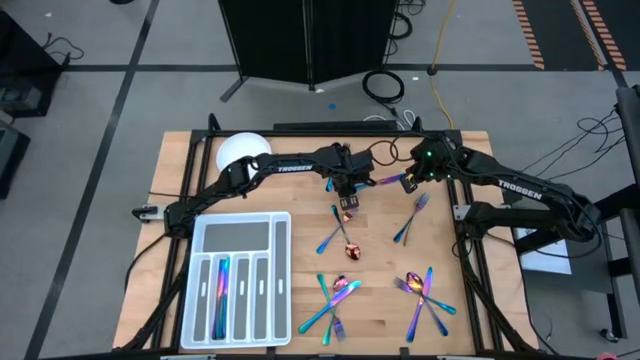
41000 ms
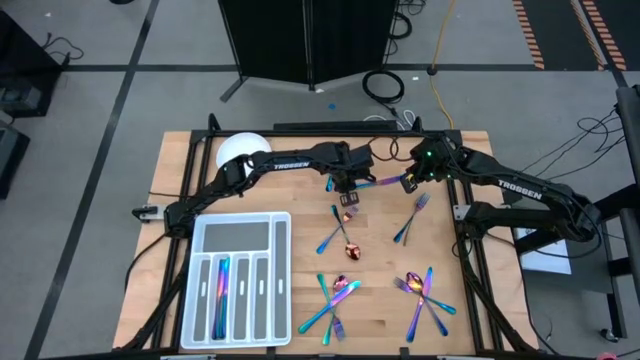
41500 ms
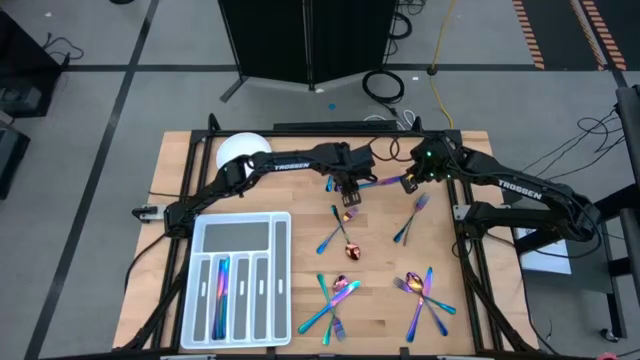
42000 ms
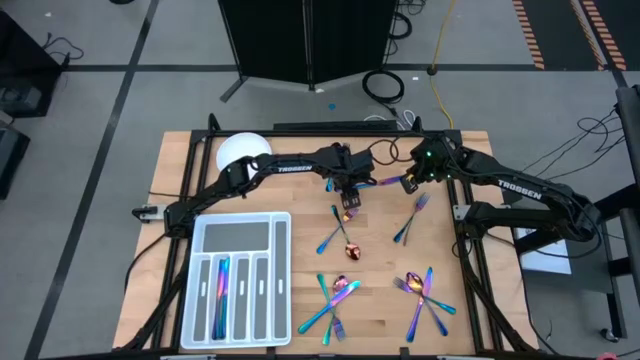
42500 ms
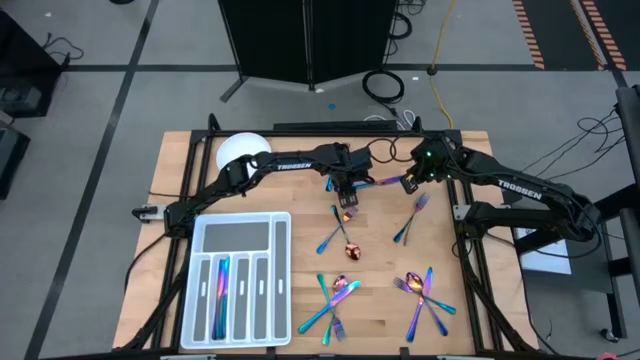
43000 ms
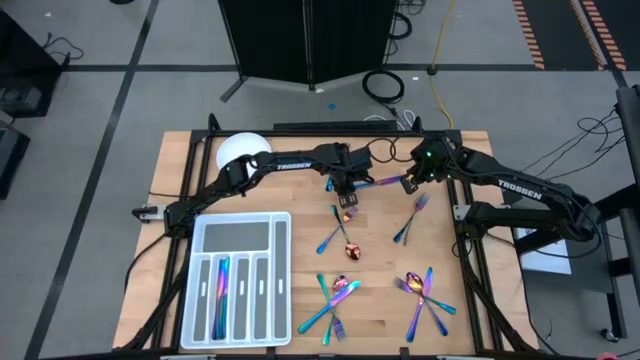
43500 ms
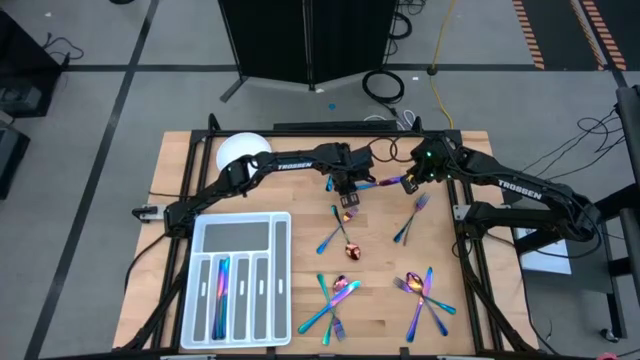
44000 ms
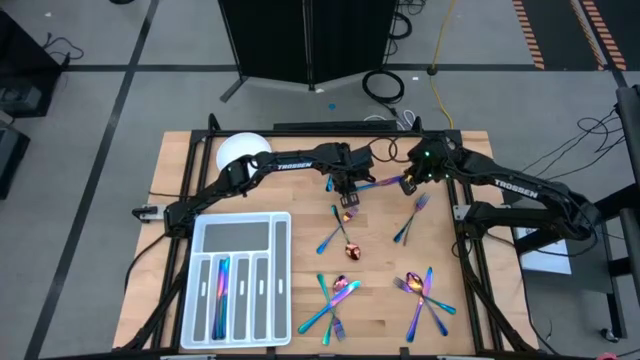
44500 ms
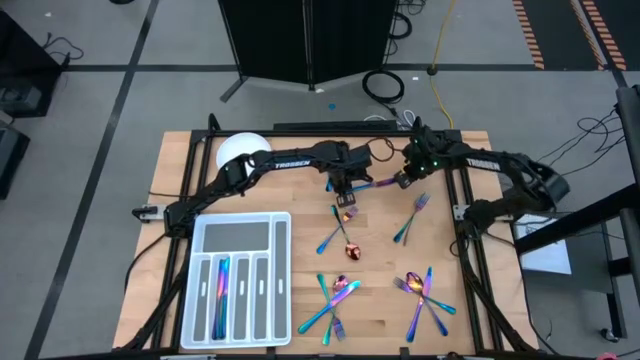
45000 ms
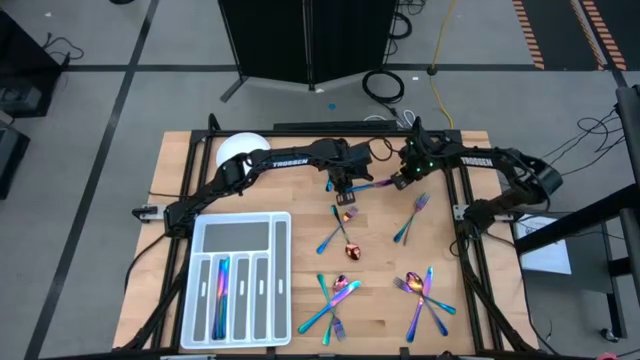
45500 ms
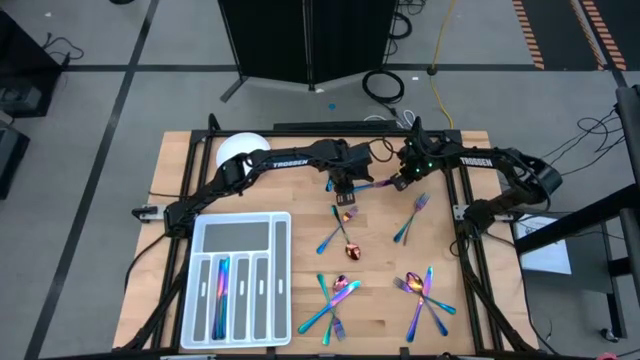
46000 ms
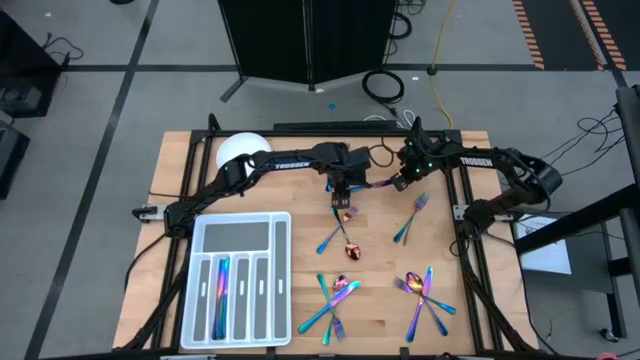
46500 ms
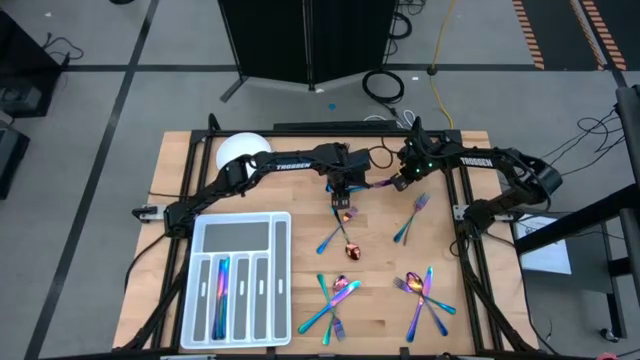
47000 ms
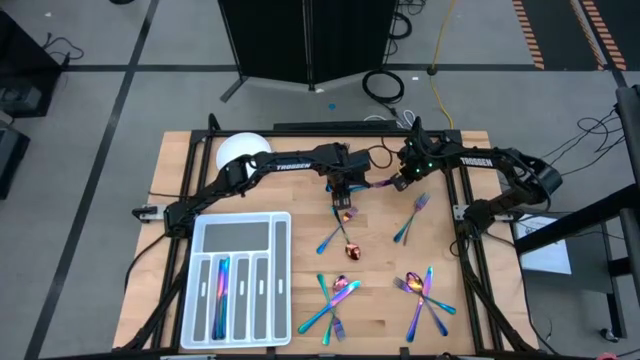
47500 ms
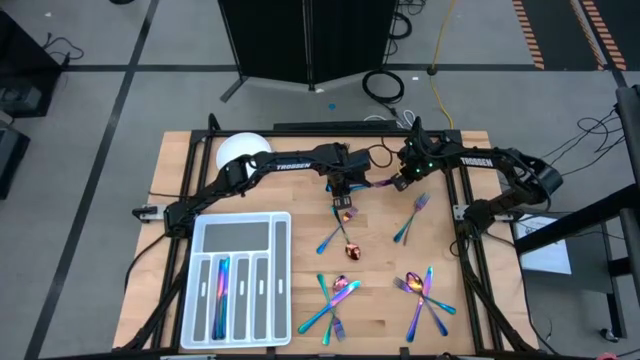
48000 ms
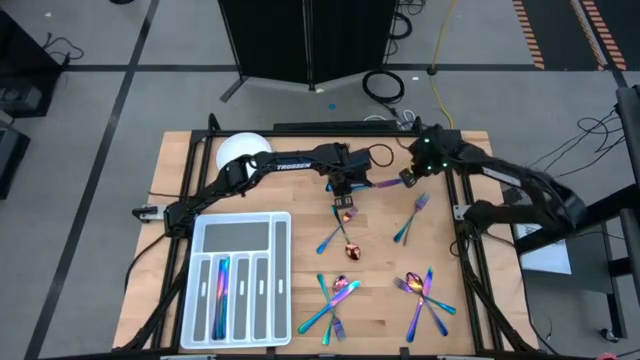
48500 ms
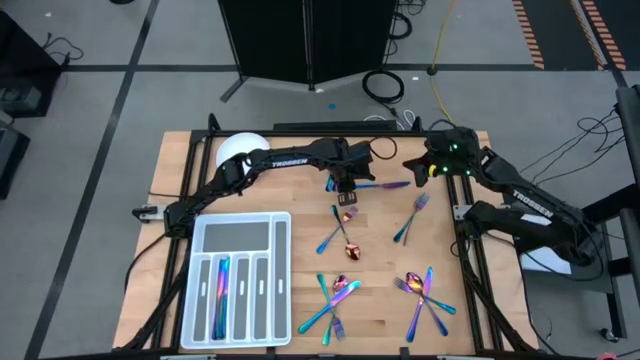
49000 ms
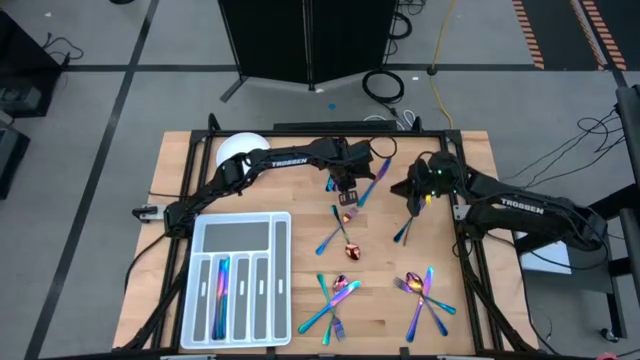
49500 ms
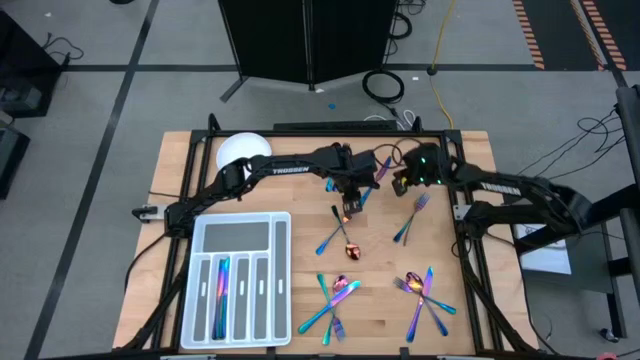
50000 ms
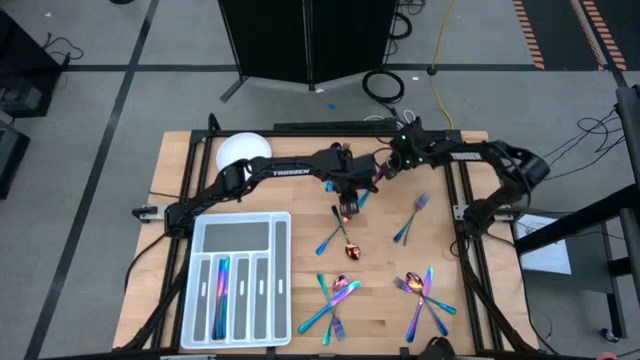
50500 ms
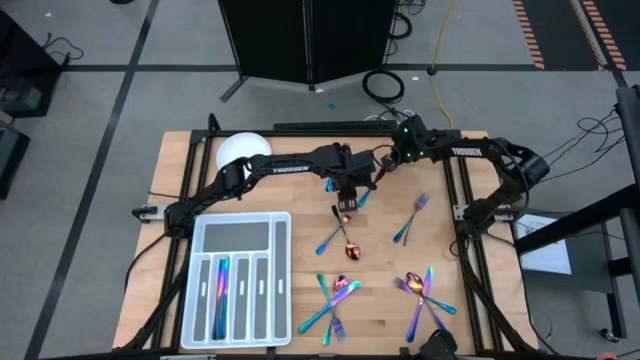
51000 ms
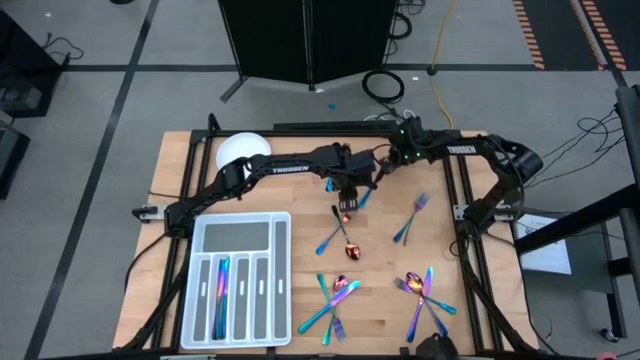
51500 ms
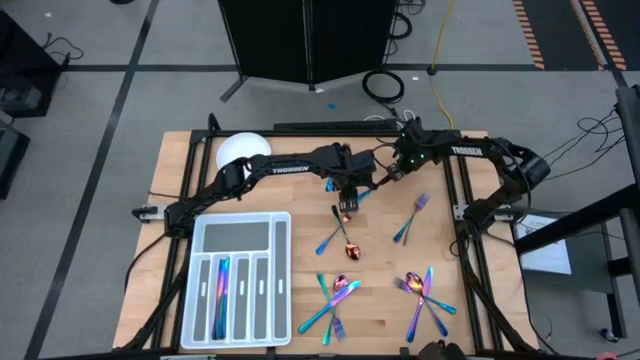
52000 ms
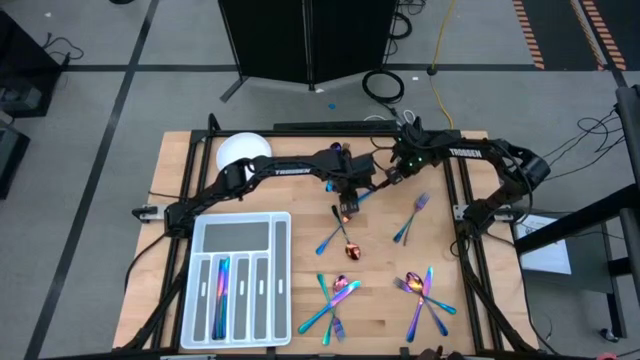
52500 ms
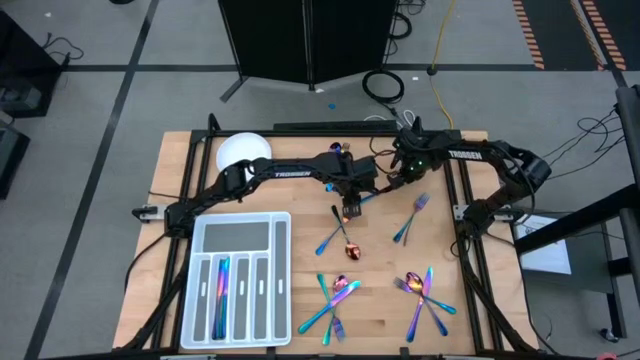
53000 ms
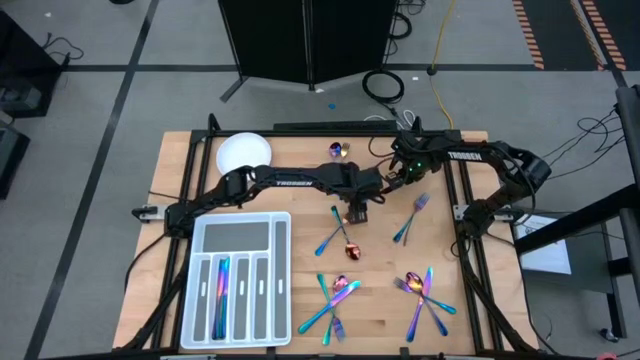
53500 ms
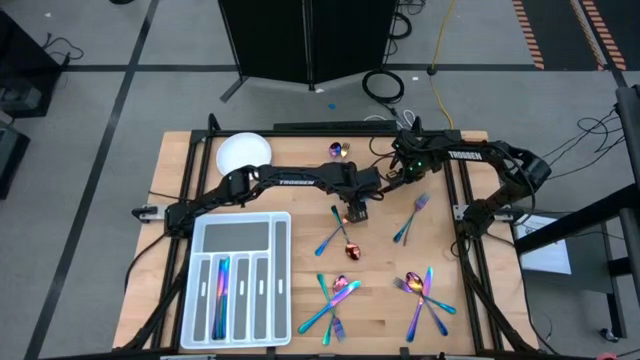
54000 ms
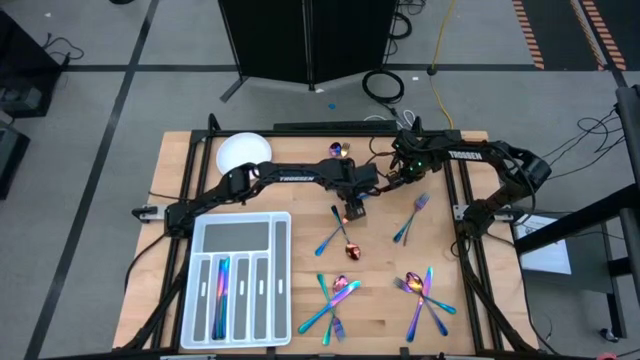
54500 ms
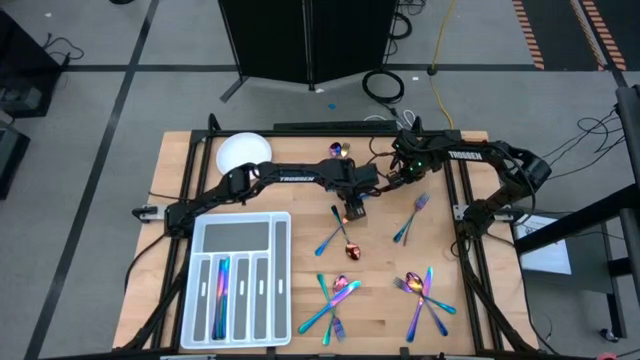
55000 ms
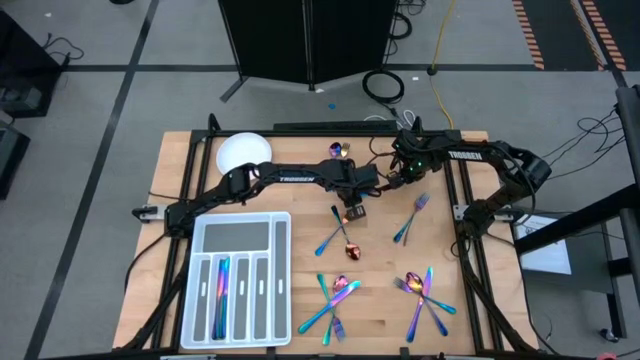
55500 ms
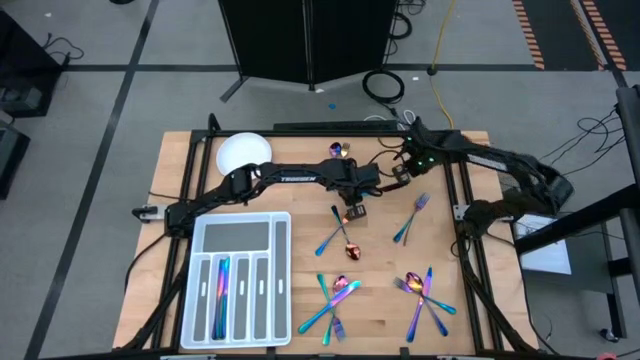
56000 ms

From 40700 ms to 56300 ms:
Task: Sort silverware
Put the iridescent blue knife in the silverware tray

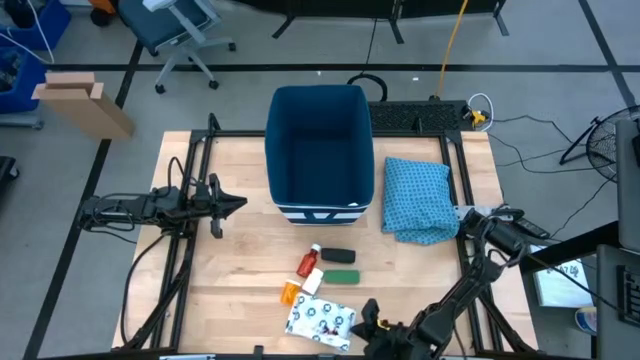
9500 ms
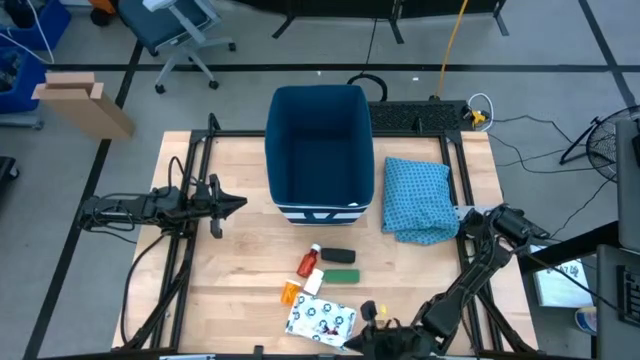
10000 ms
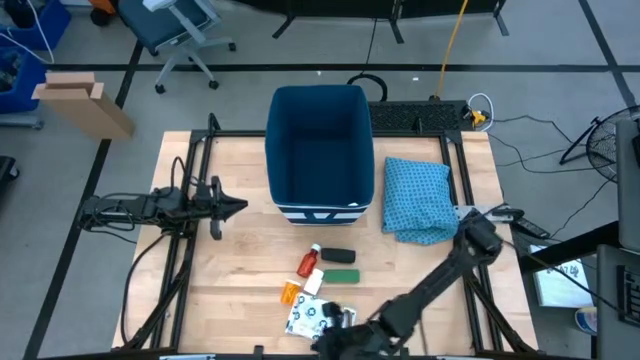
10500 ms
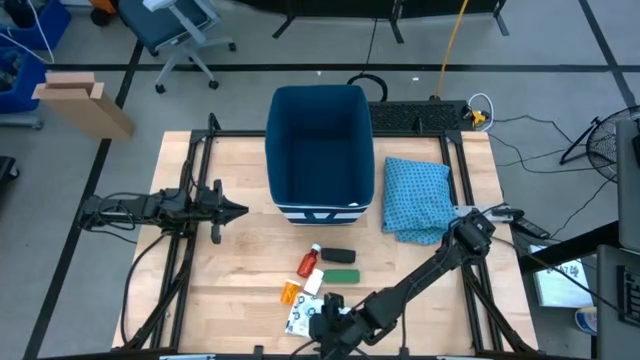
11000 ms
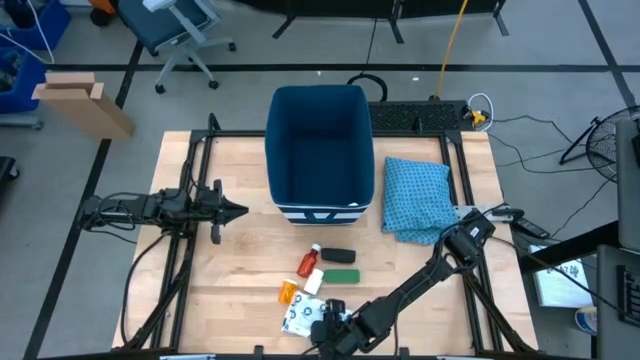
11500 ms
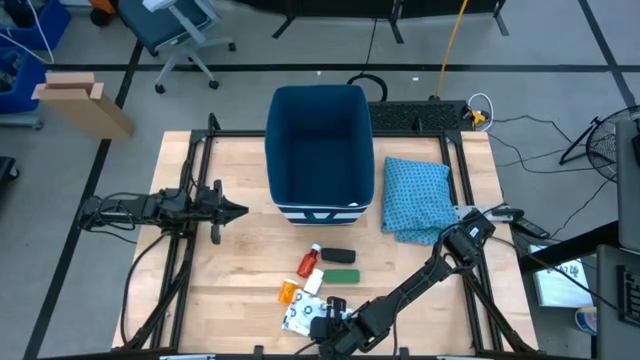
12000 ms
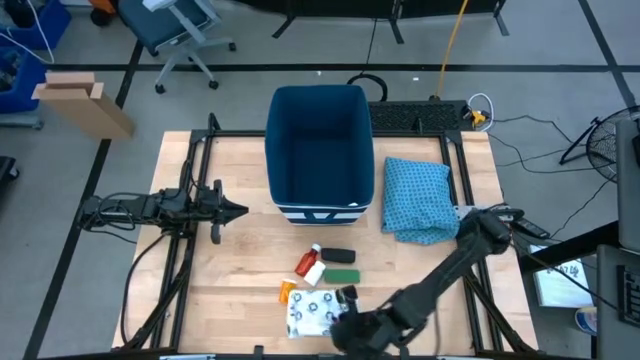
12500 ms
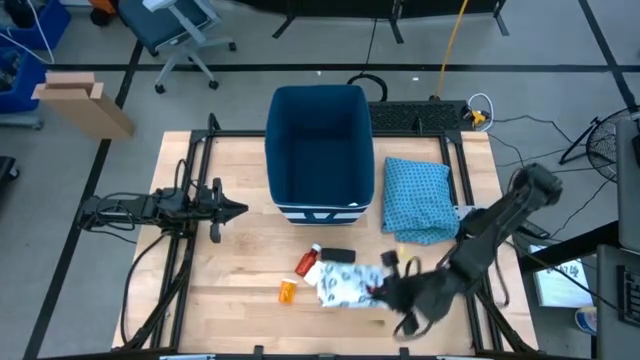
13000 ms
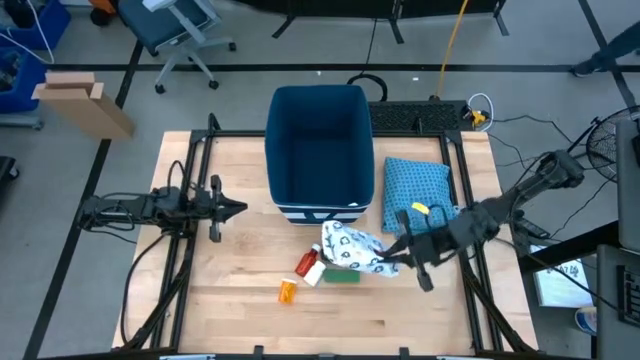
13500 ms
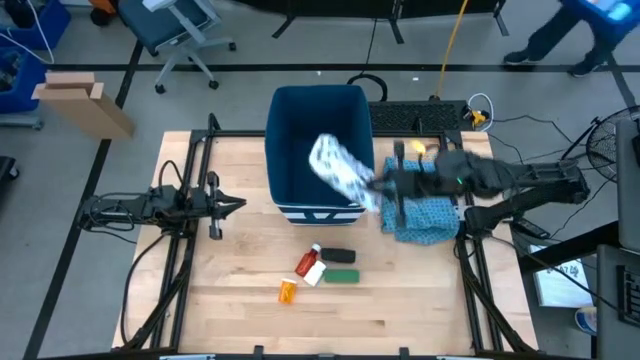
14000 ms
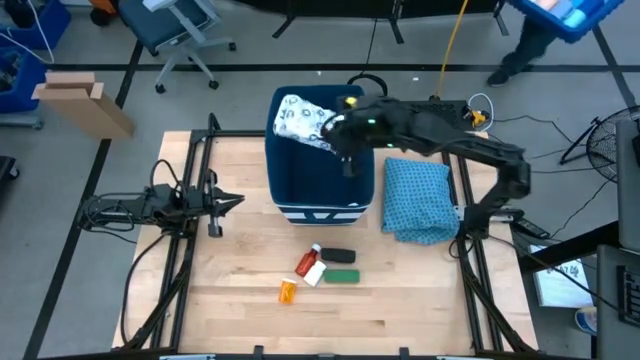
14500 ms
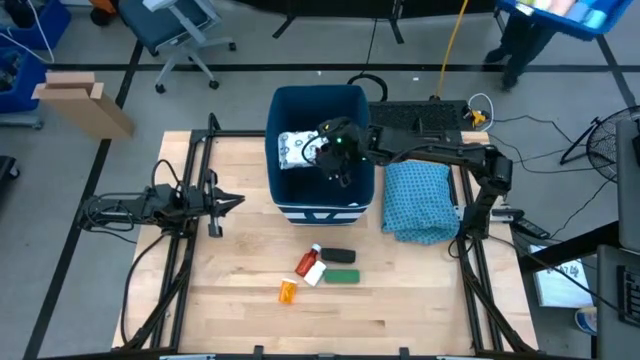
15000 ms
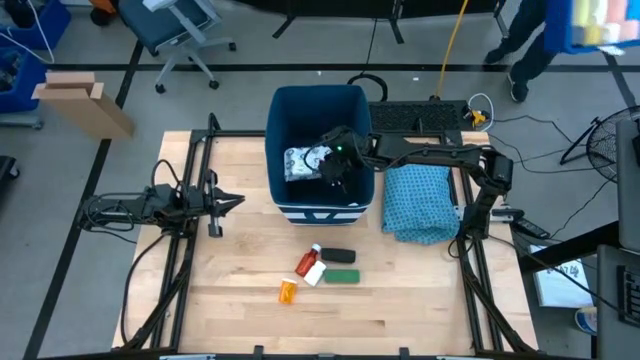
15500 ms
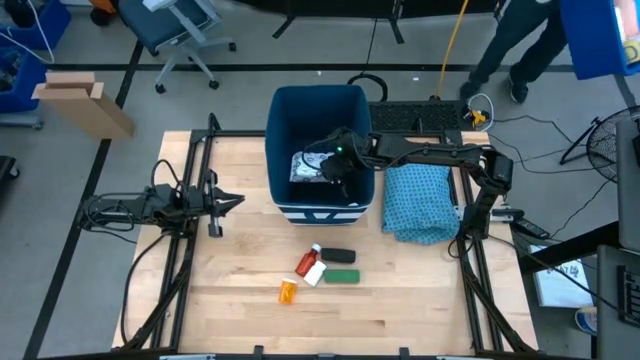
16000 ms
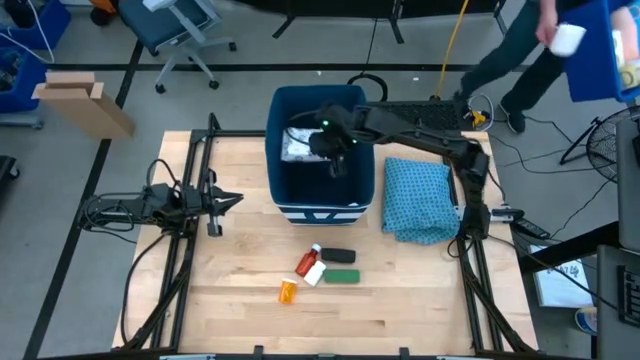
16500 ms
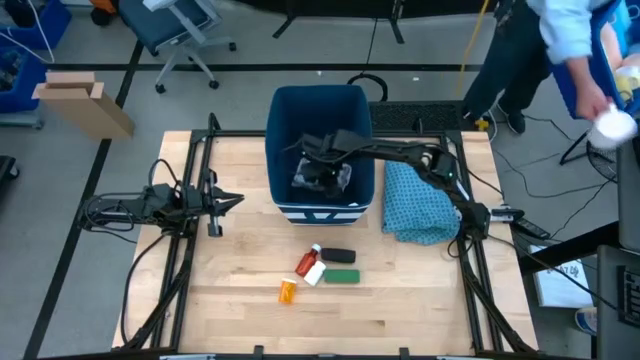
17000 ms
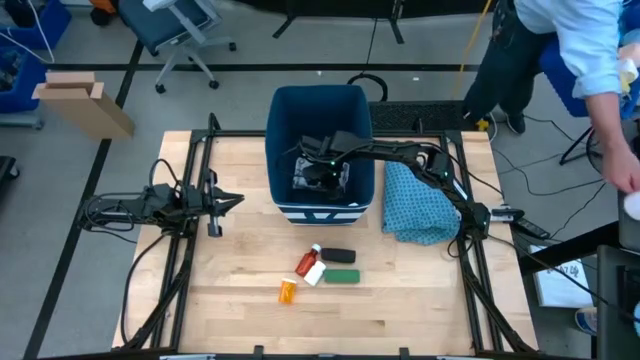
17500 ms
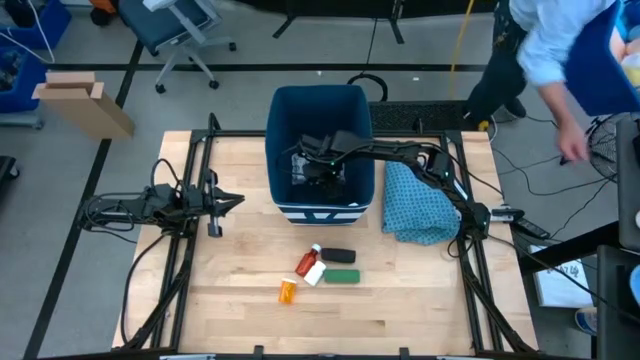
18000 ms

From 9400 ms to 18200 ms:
Task: Pick & place medical supplies in basket/bin
Put the mailer bag into the blue bin
